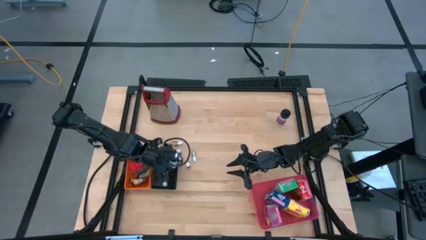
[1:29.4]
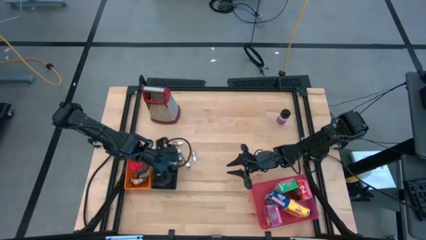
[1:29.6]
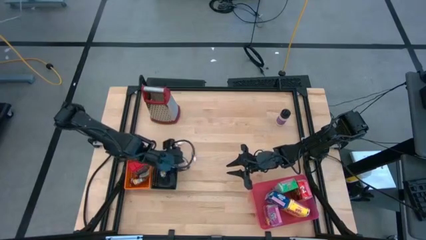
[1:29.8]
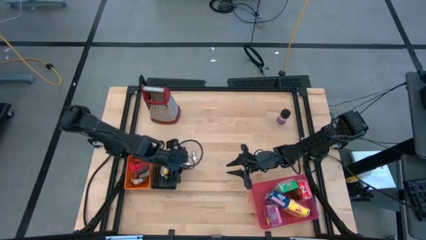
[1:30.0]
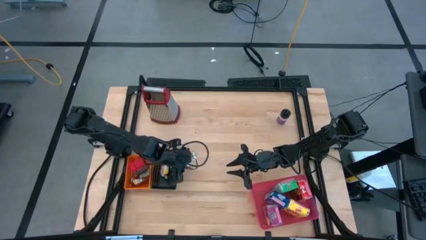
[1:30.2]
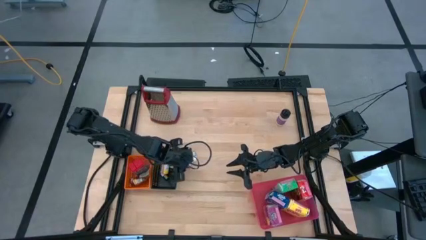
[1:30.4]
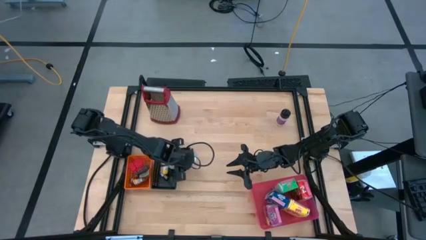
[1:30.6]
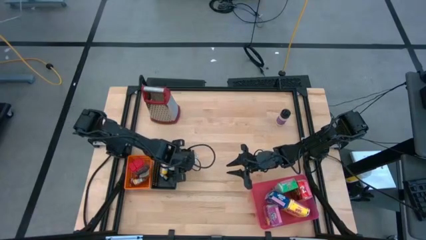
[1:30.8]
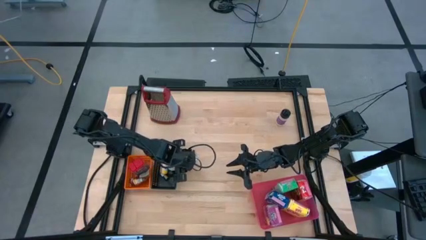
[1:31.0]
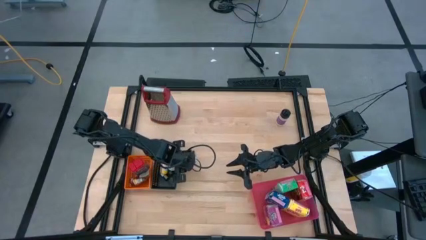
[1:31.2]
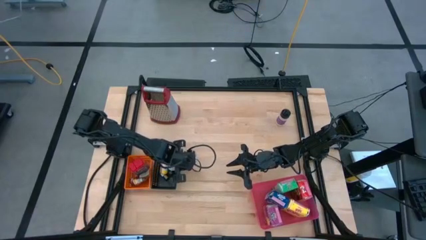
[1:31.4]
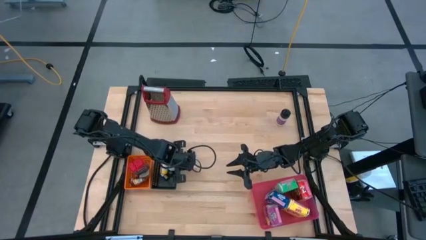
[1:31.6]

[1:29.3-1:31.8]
Task: Pick & Place Kitchen Items
Put the orange food coloring bottle into the black bin

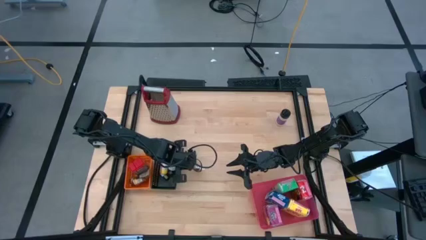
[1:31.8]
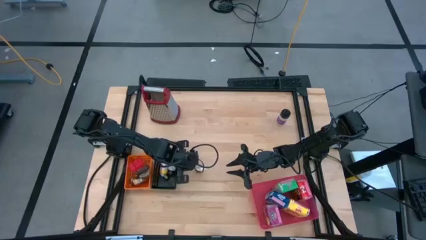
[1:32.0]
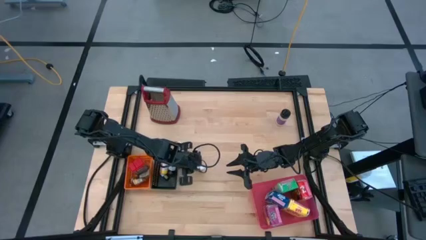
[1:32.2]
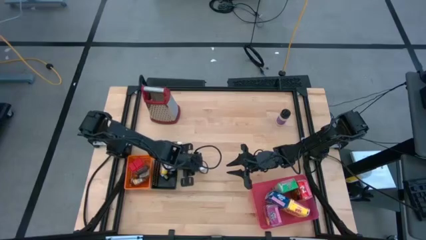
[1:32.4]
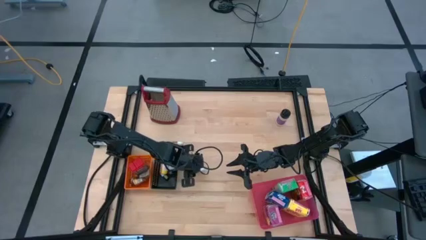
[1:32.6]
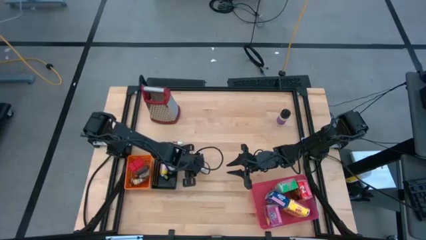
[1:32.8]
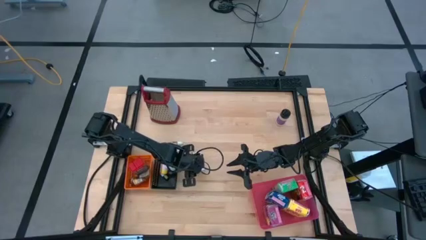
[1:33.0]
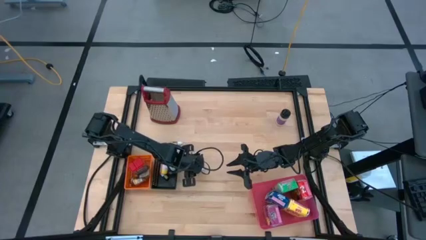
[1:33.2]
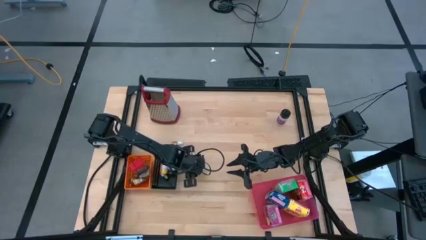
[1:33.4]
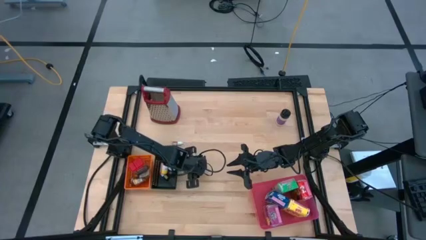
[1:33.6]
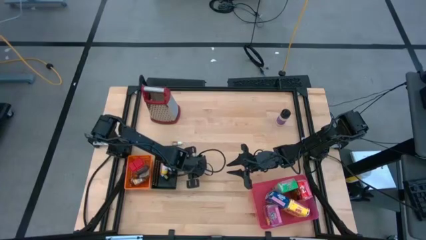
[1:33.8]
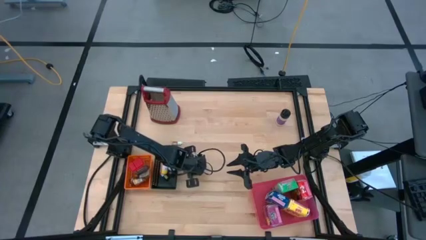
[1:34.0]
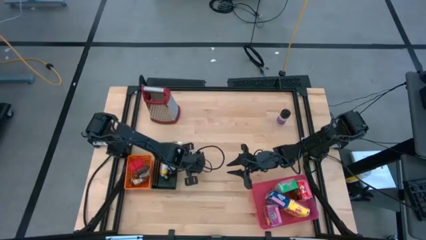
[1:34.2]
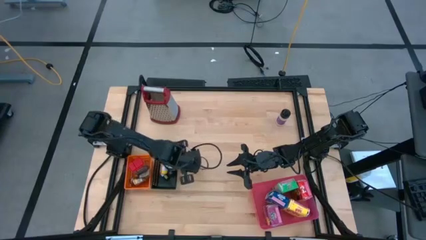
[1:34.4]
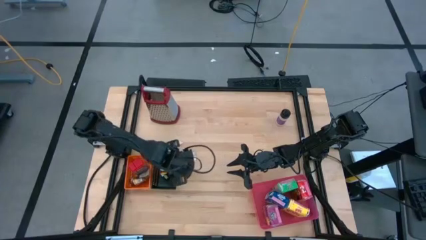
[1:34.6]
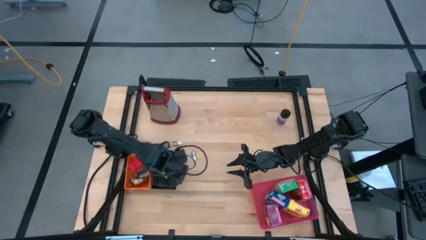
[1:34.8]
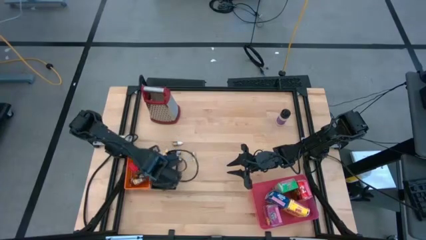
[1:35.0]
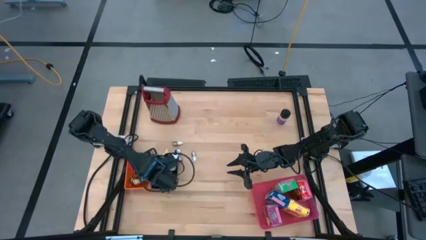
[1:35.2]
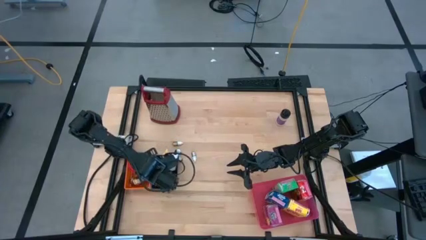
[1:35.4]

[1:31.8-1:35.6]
Put the orange food coloring bottle into the black bin

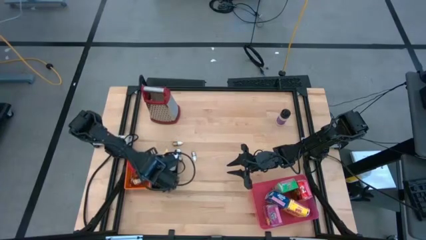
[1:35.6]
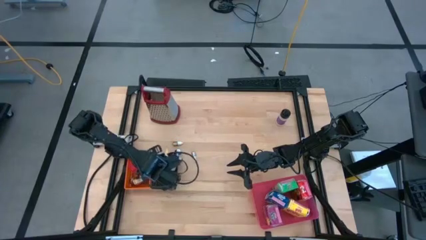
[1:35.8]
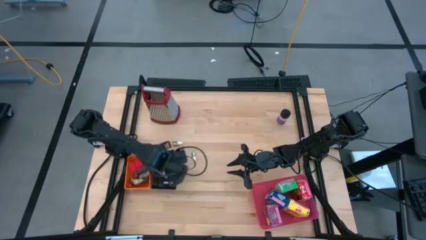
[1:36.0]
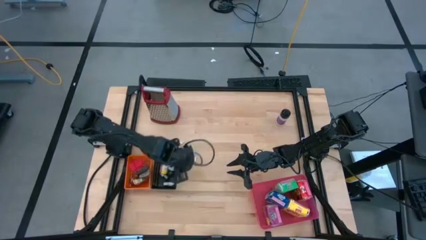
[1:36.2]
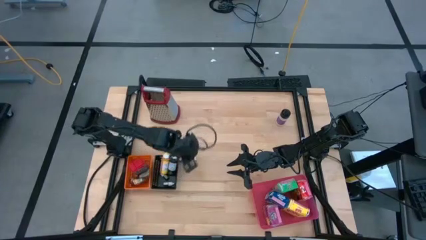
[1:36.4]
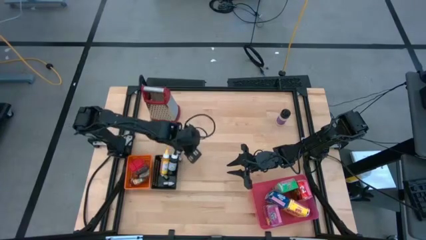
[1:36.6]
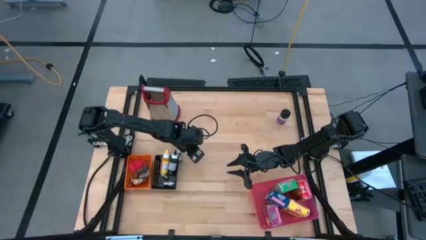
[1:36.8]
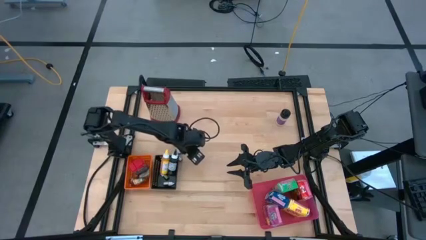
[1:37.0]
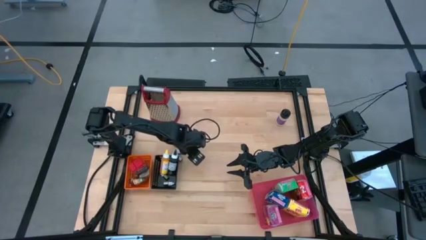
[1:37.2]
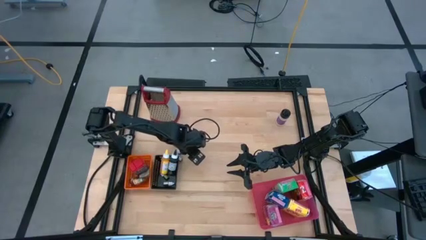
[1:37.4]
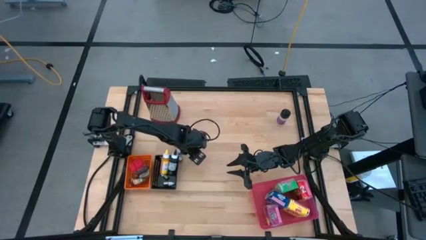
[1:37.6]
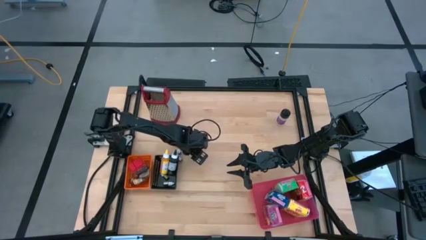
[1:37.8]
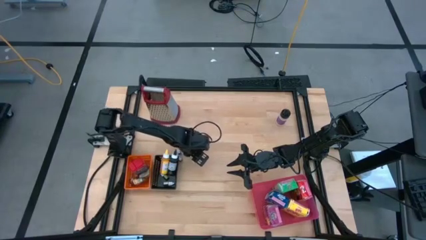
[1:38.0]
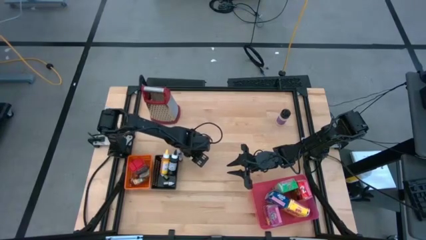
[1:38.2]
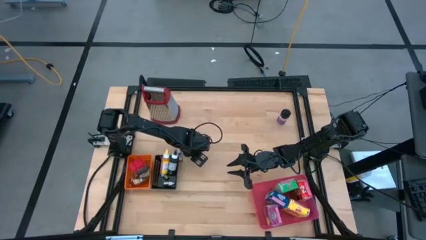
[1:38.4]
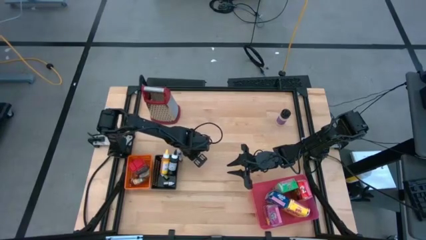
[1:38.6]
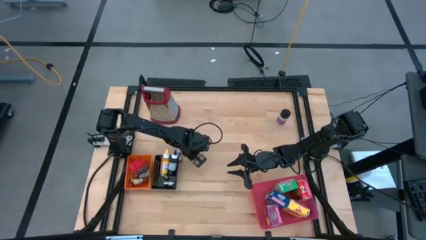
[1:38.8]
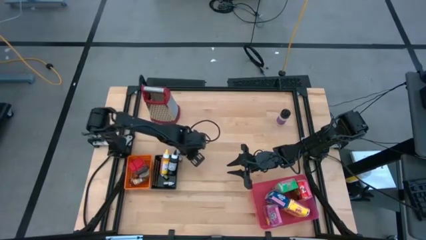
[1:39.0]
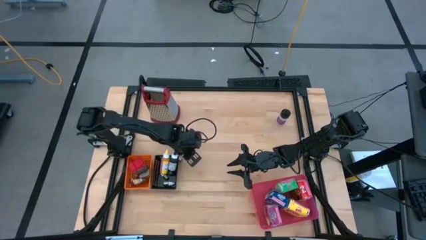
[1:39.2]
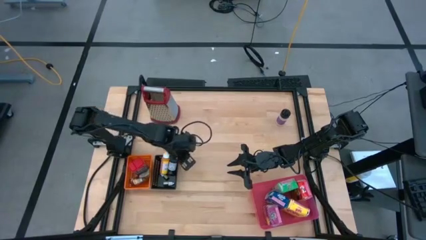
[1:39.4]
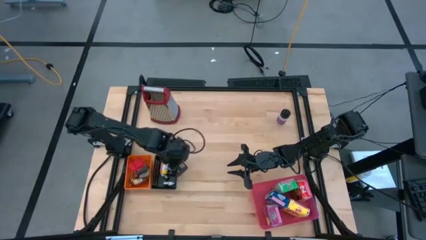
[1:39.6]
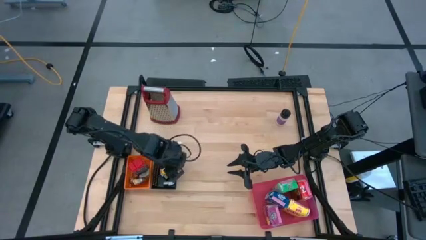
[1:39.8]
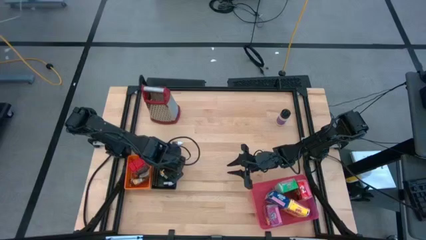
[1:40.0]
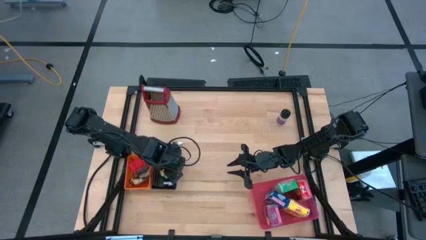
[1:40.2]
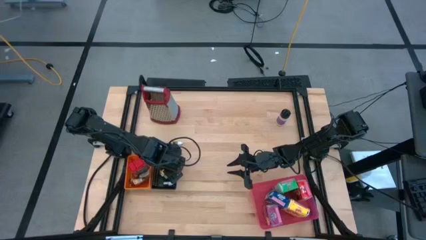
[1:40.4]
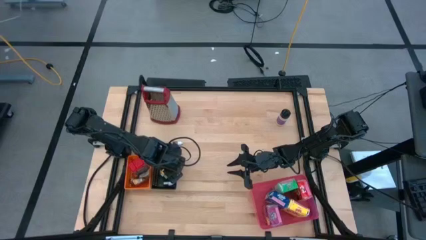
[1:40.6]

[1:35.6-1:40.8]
Put the brown food coloring bottle into the black bin

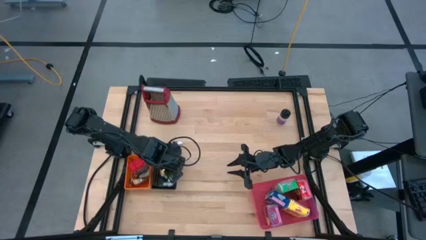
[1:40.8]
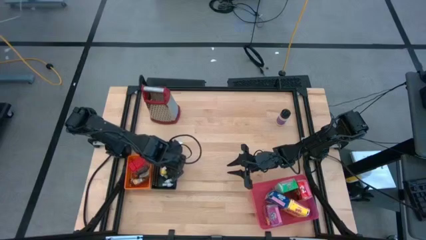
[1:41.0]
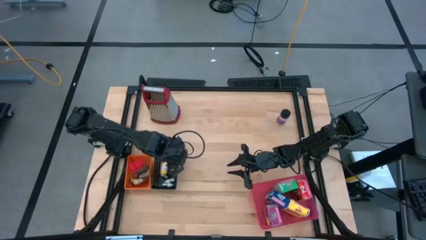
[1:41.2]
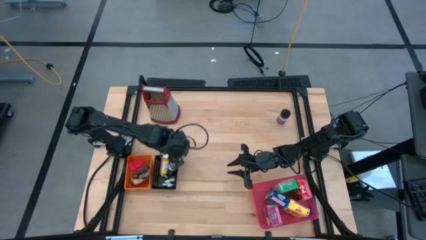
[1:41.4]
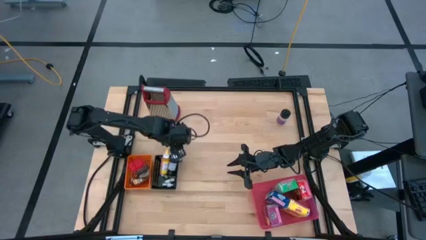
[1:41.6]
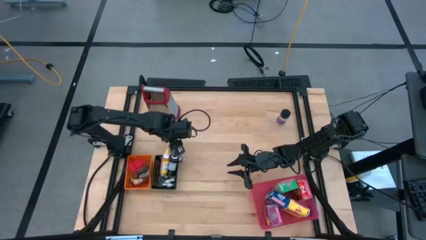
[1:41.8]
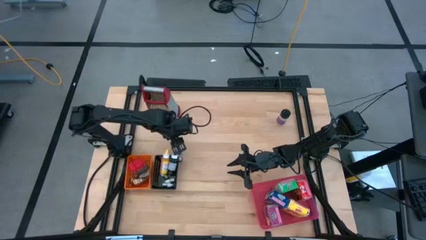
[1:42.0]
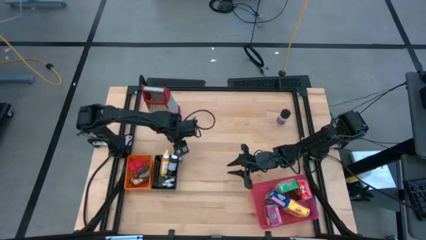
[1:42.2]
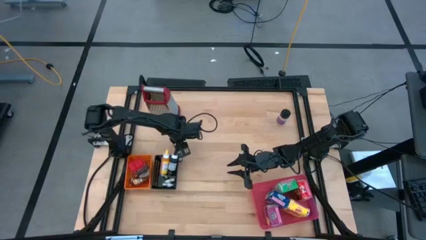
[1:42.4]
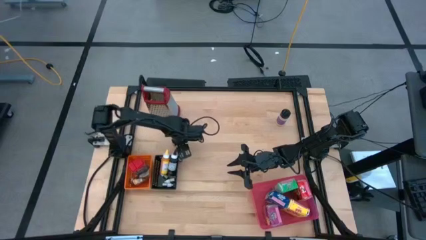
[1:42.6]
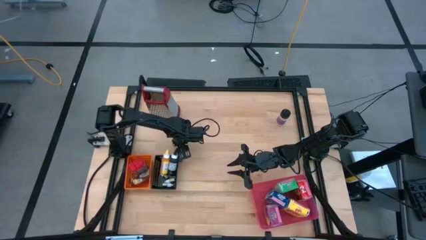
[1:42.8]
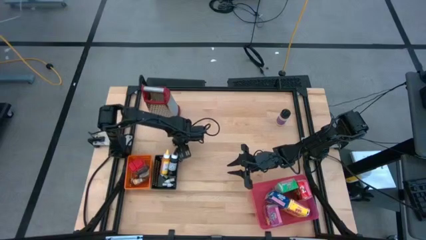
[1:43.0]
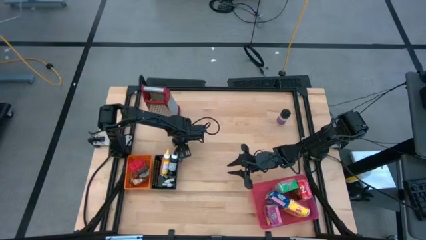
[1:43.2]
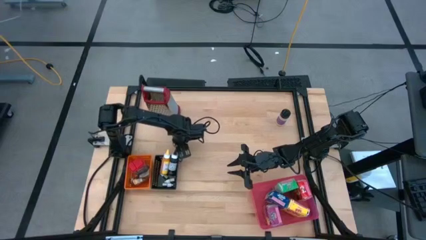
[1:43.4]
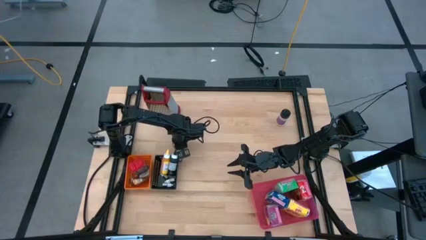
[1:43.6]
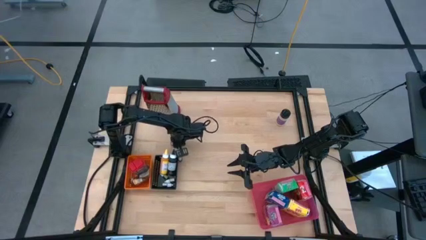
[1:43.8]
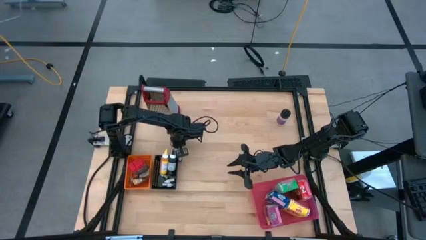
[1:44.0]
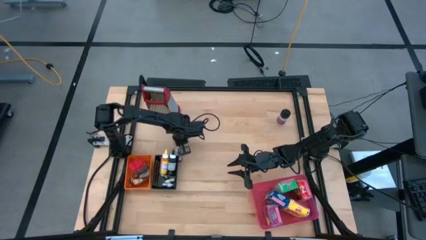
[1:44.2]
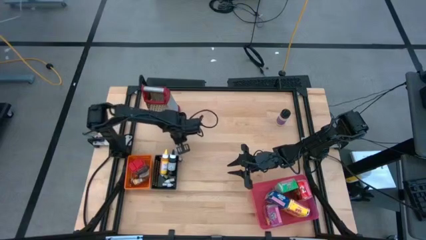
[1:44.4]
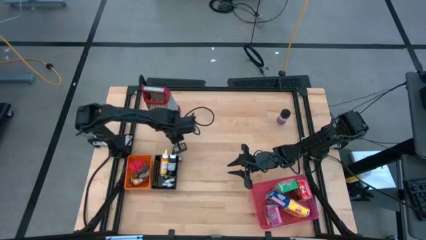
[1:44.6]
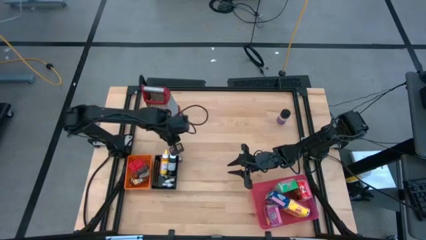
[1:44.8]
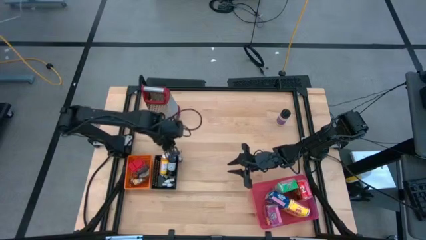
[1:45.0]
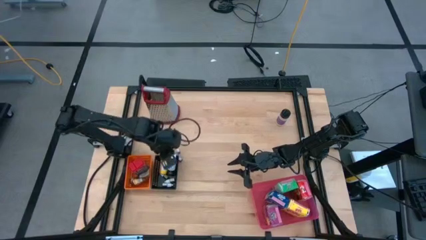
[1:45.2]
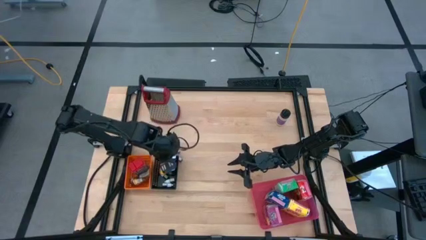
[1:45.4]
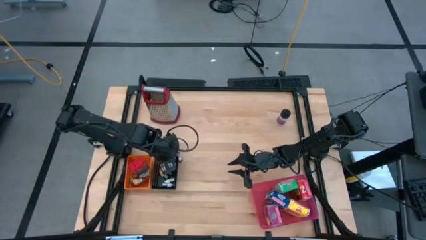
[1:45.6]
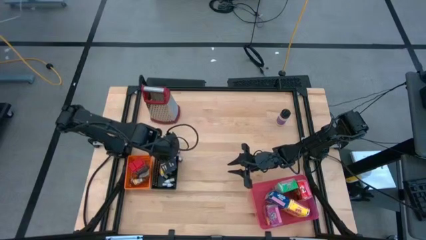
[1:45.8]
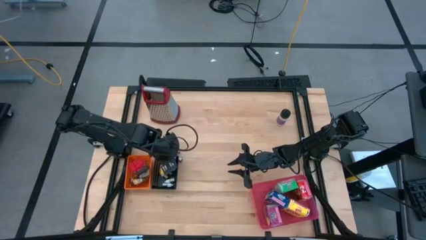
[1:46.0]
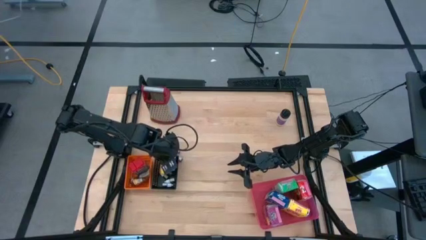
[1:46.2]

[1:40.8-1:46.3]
Put the yellow and brown food coloring bottle into the black bin
